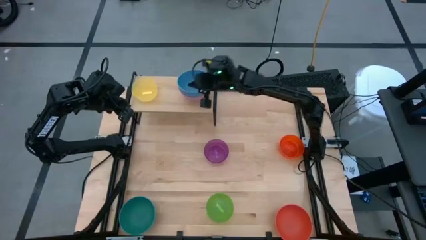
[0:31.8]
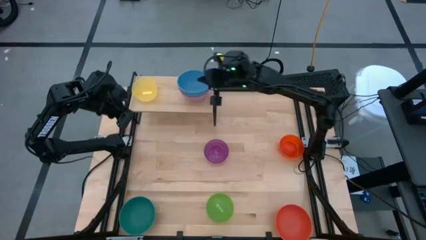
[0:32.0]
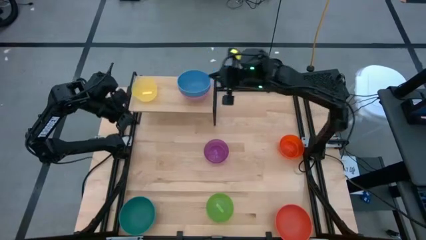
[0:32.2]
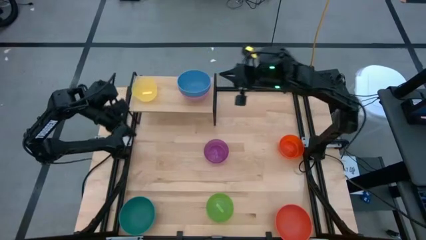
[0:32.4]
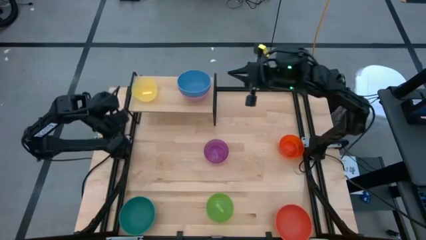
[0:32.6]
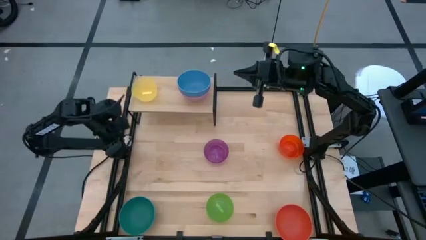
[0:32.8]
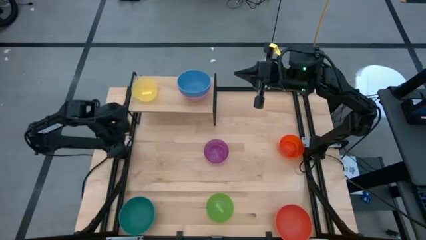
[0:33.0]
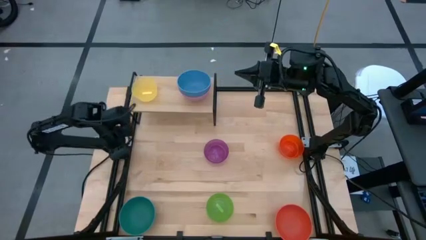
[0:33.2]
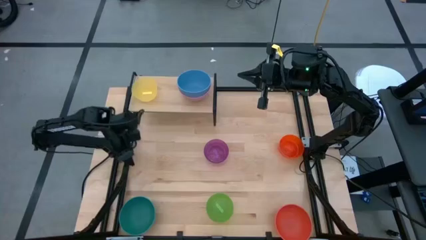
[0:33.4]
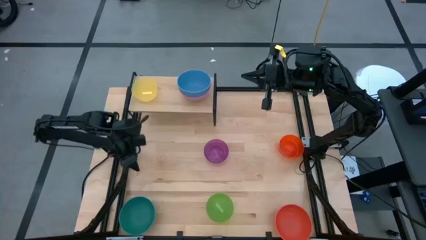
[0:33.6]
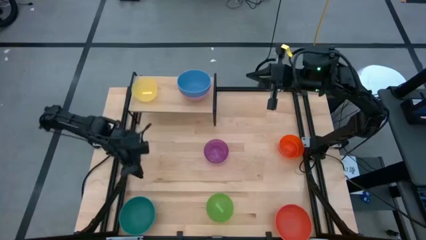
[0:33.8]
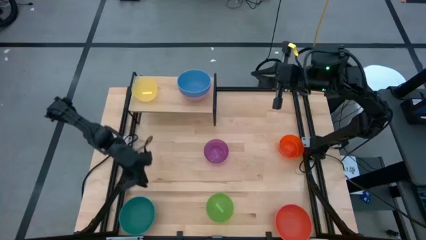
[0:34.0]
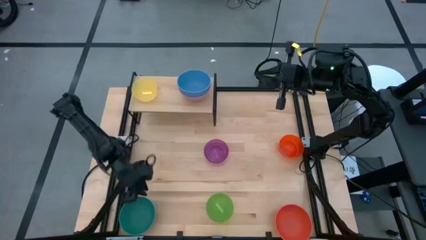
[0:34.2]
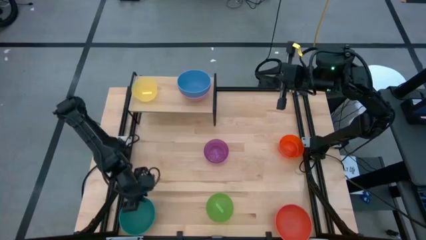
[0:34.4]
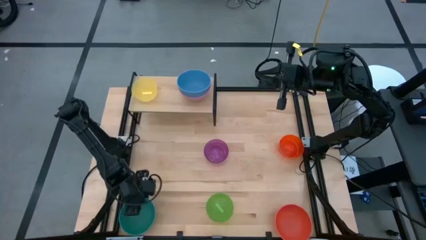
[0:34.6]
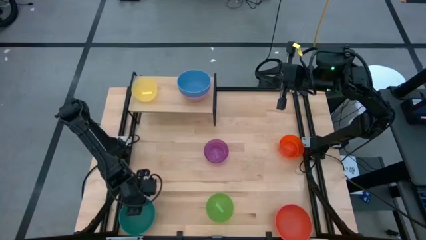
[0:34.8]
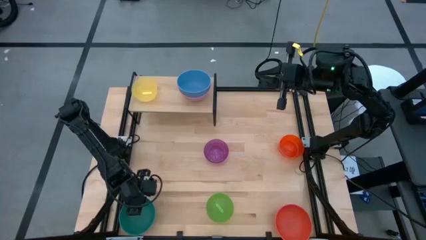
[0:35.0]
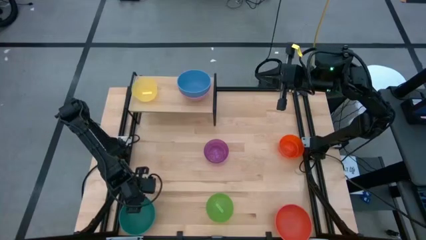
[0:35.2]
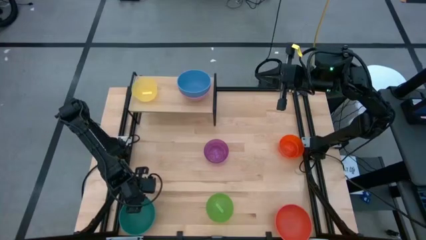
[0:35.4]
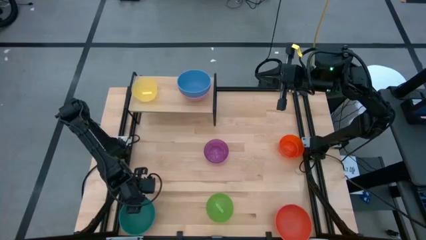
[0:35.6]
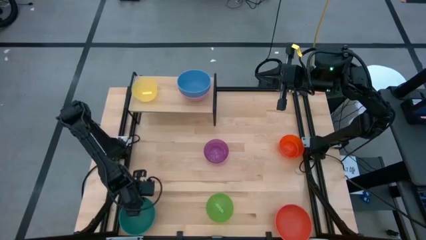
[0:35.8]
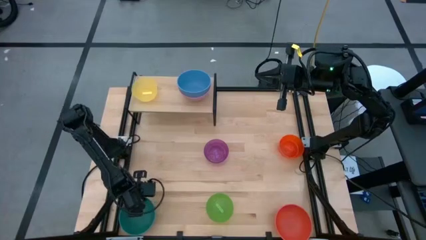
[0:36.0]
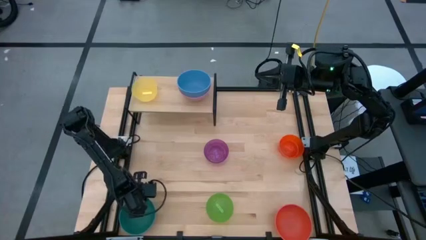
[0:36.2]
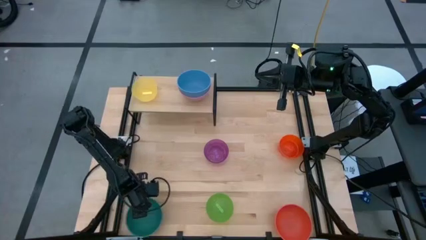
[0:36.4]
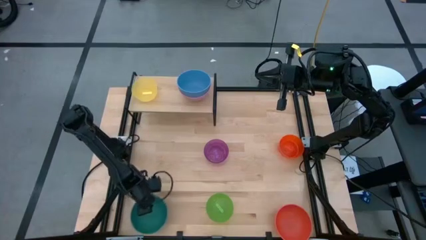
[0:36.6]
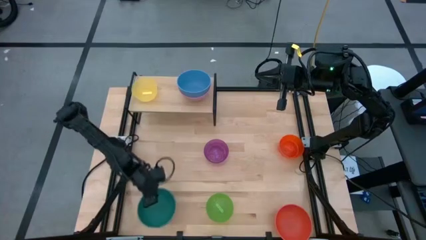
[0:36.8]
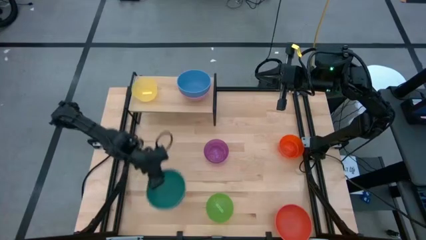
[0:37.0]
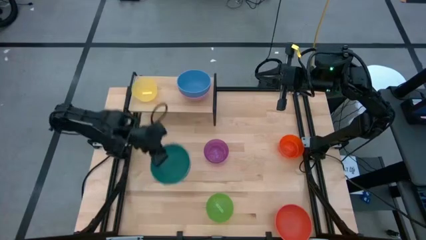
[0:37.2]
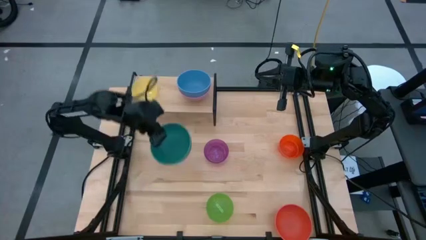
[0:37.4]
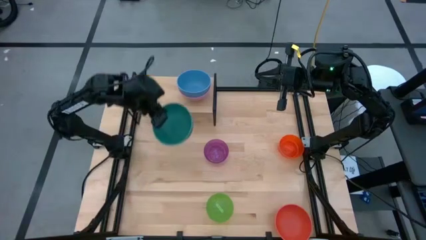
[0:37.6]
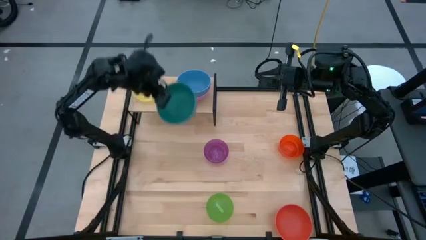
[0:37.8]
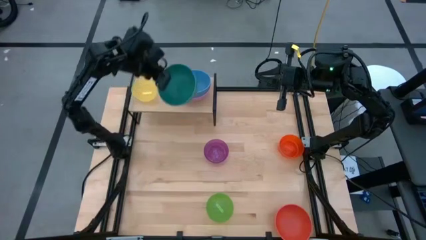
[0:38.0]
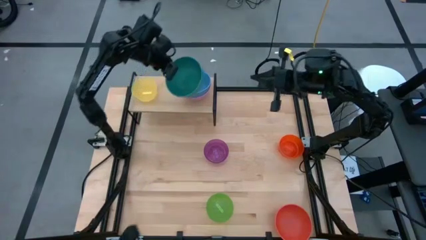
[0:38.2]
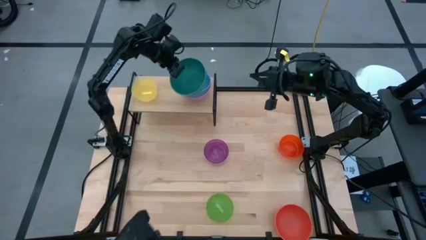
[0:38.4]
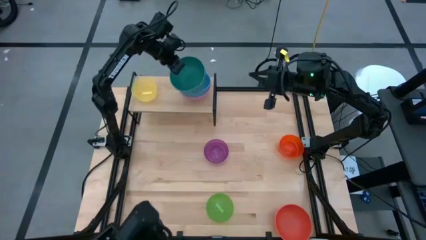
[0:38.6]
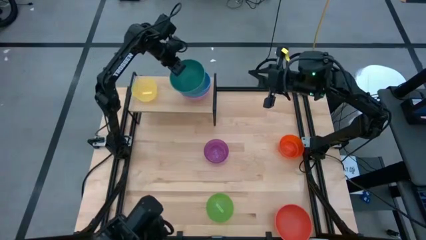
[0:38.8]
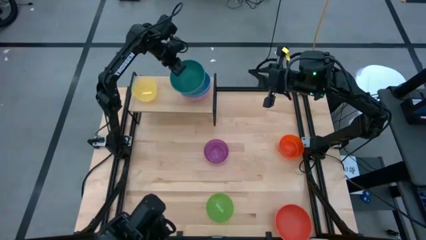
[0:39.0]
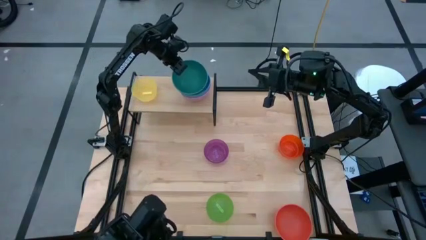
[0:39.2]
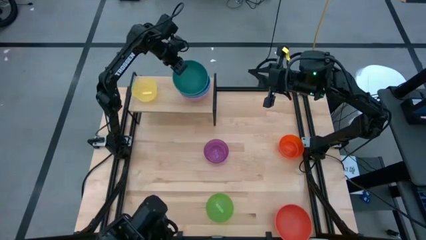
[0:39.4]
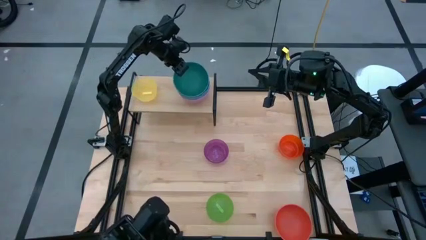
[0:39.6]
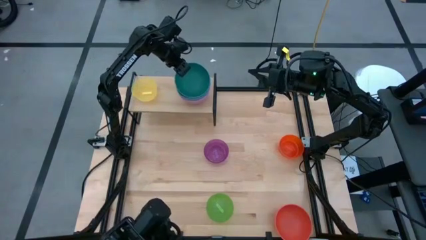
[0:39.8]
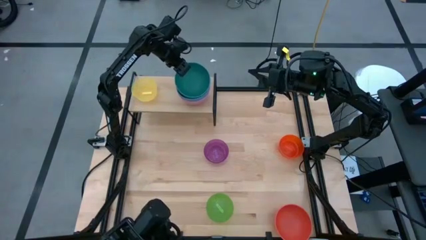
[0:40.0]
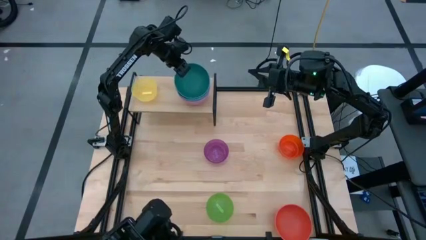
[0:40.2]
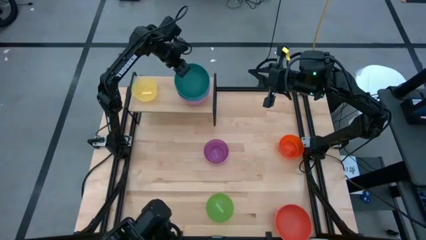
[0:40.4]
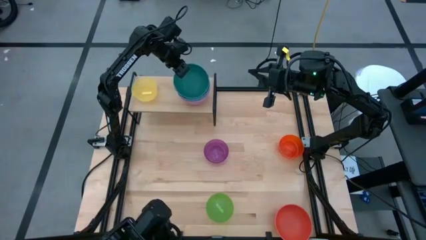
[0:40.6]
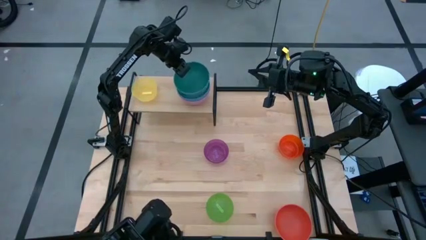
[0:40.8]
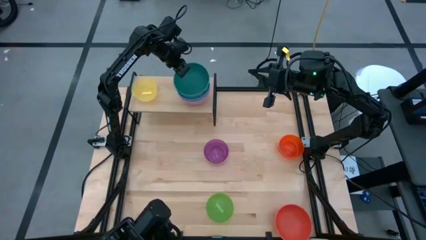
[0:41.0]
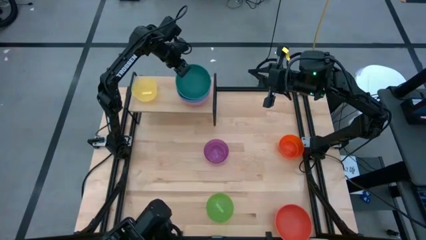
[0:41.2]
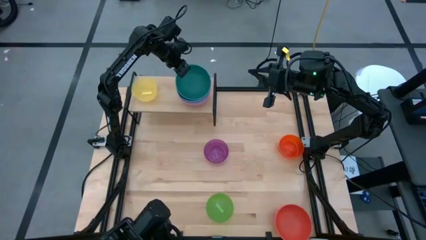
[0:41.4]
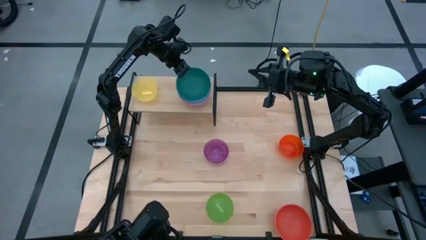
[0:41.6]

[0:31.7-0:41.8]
Task: Place and stack bowls onto a shelf
Stack the green bowl on the blue bowl on the shelf

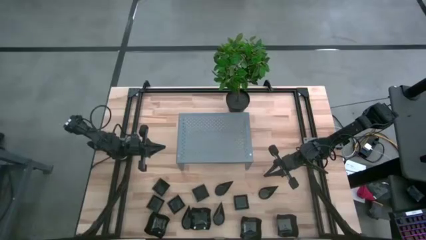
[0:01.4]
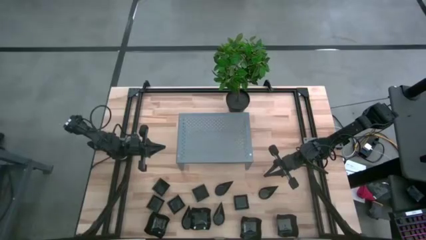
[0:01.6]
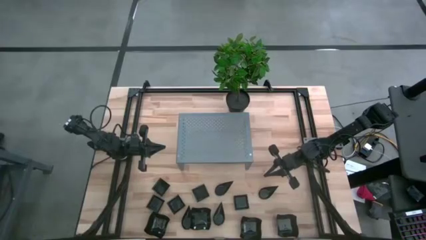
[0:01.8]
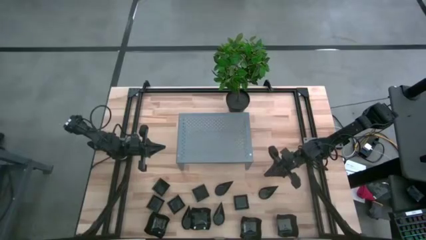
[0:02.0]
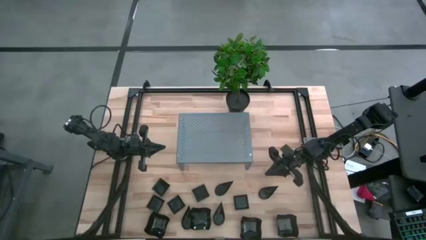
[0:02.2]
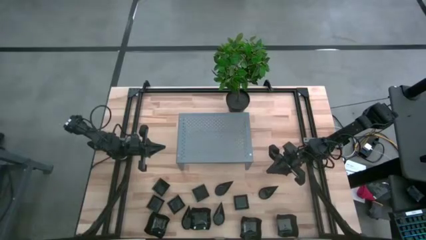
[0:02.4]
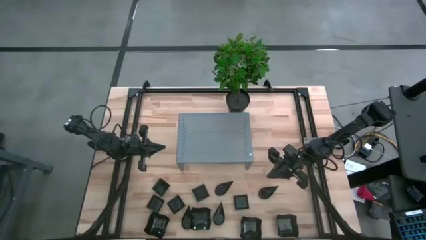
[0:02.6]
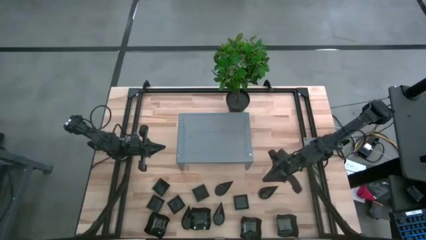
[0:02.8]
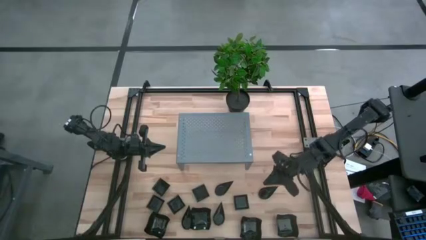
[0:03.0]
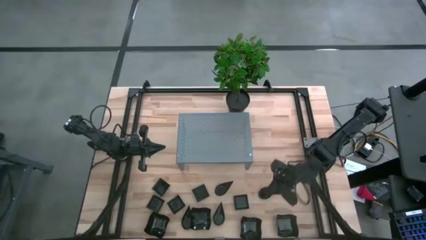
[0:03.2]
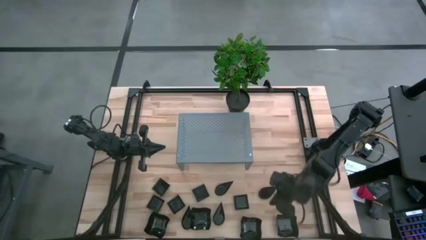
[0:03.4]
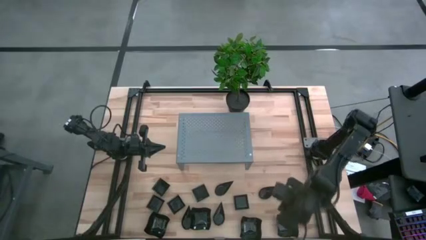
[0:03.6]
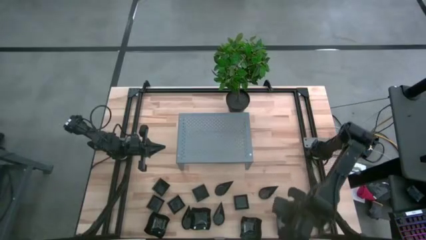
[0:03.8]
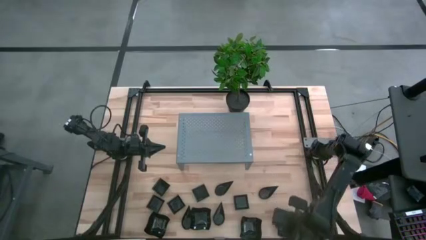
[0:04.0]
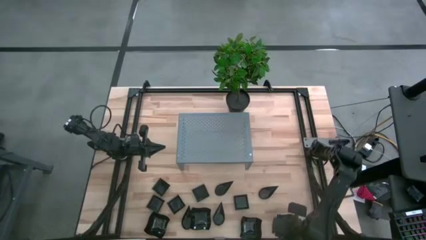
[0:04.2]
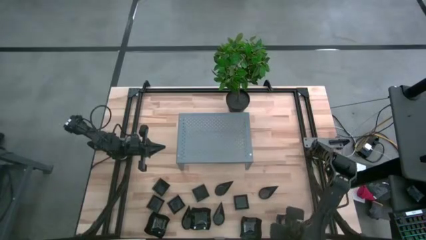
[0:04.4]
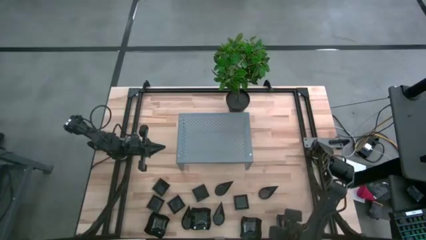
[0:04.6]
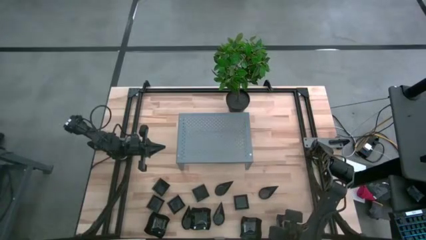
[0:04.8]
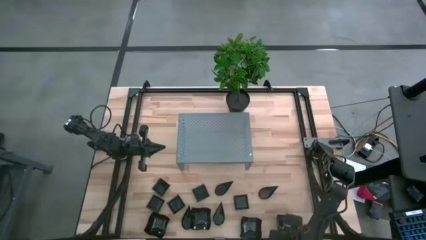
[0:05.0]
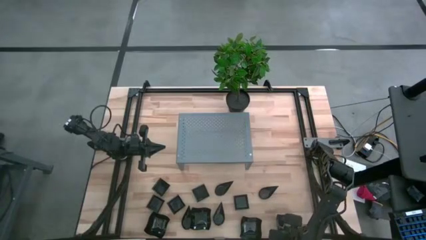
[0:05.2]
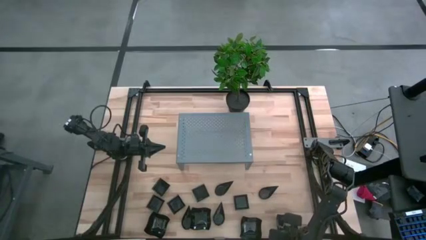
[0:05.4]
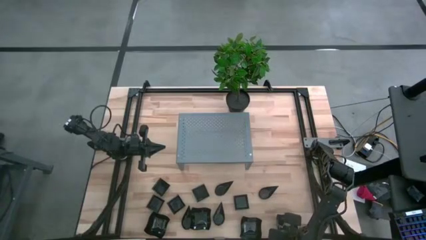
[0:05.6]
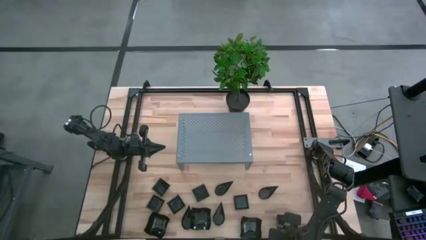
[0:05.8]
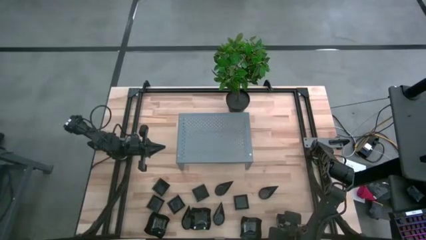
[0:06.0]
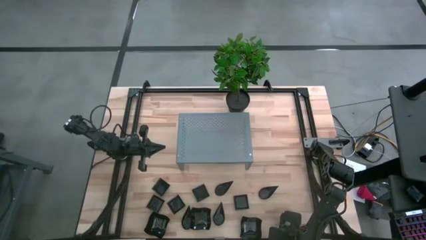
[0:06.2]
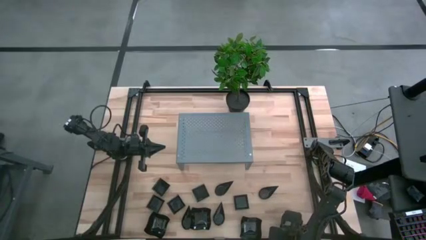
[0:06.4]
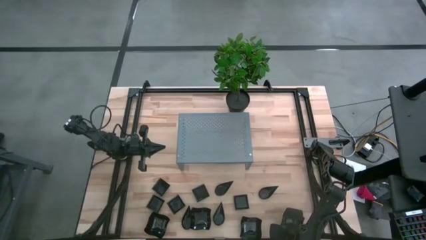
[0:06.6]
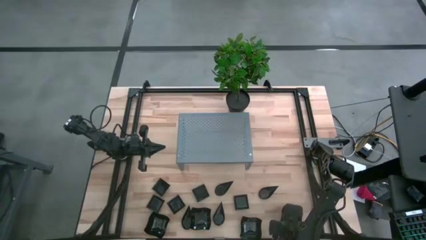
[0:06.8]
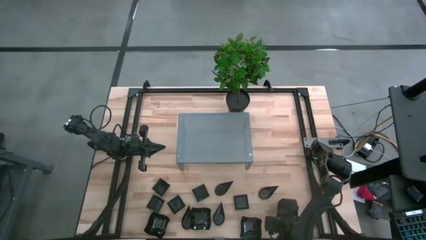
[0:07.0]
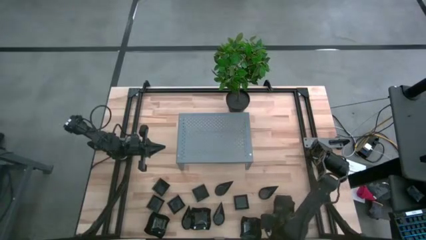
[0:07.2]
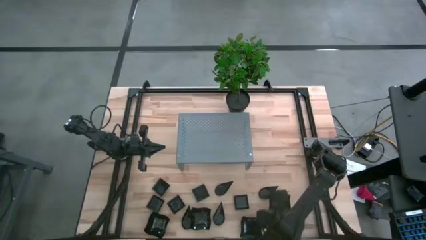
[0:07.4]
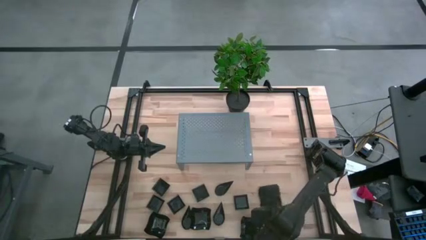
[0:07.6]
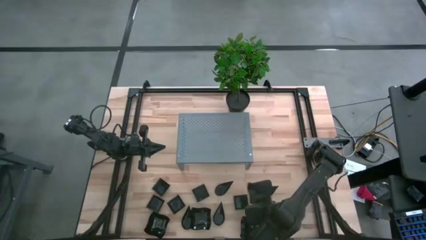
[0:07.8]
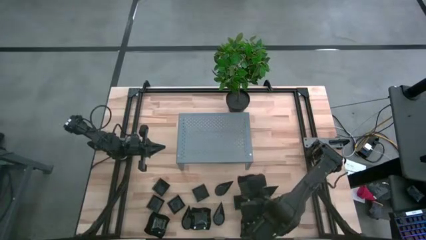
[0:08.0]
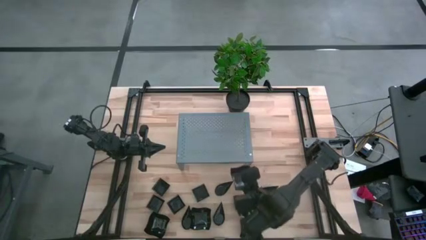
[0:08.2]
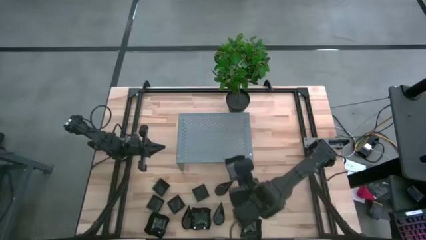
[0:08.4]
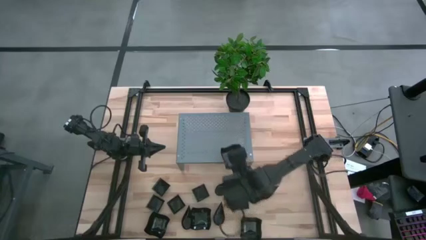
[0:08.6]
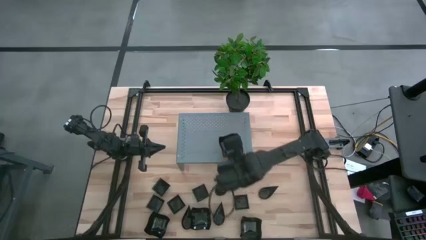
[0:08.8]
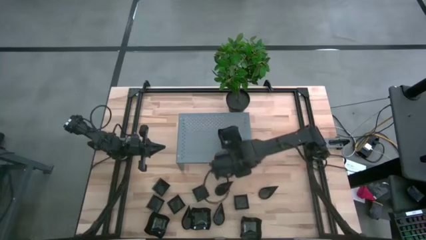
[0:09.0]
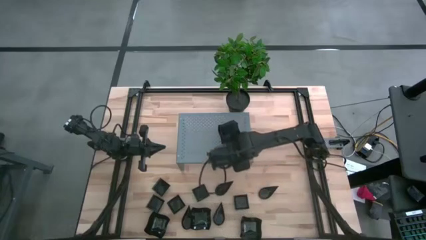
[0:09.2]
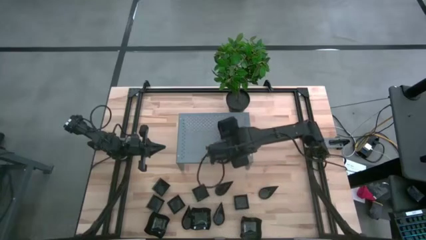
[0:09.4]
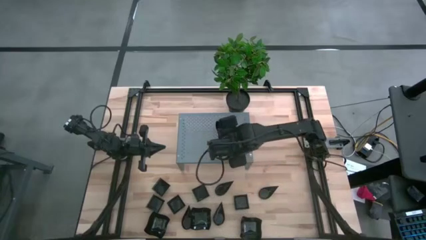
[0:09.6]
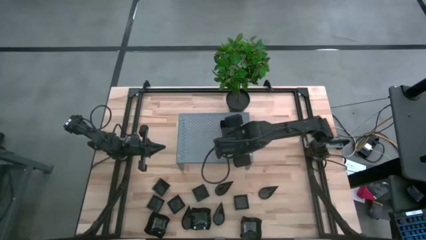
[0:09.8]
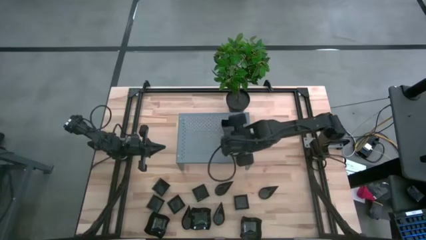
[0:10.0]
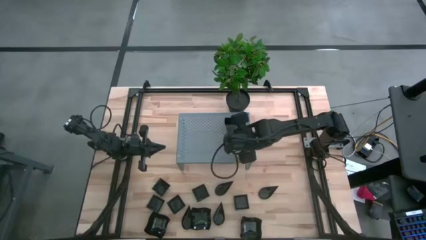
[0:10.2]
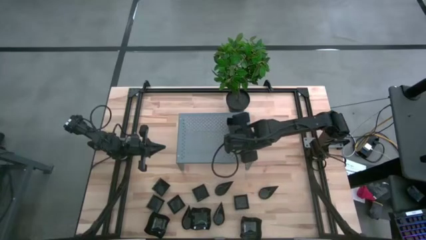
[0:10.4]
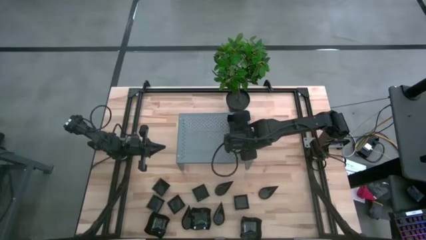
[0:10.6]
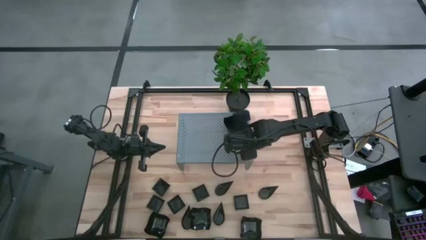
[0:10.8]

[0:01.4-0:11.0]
Task: Pick & Place Mini shaped plates
Put the black distorted square plate on the shelf
